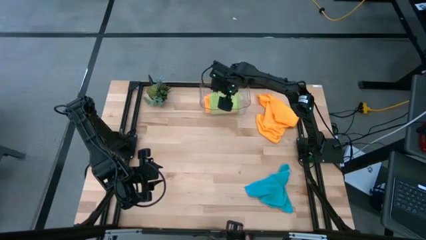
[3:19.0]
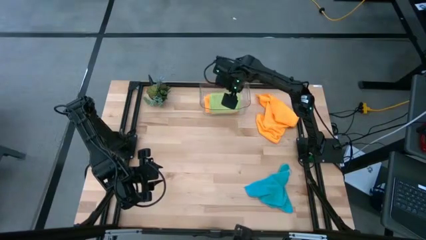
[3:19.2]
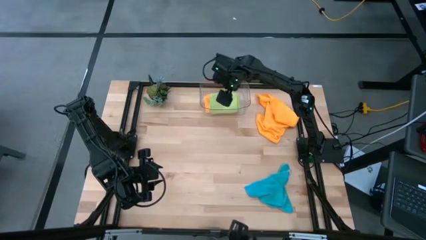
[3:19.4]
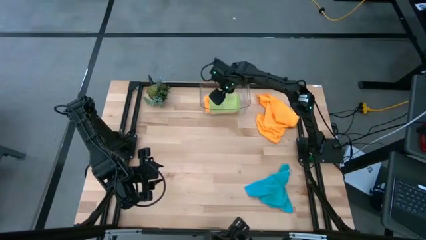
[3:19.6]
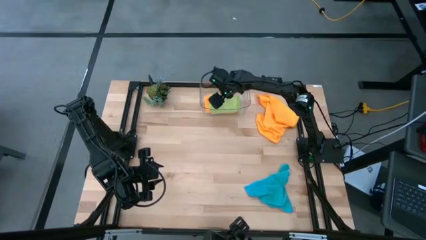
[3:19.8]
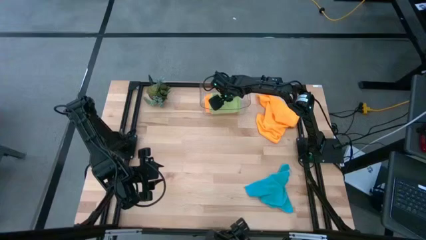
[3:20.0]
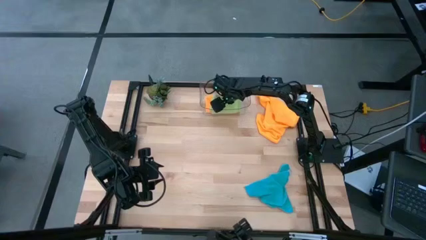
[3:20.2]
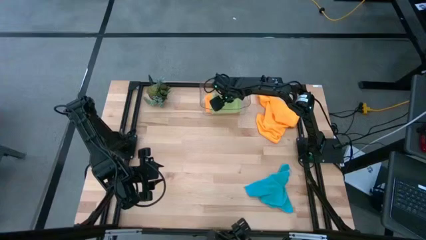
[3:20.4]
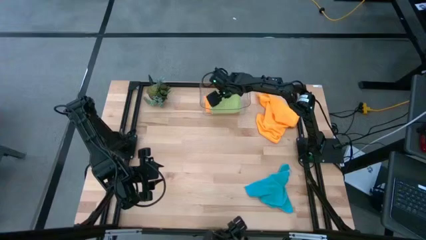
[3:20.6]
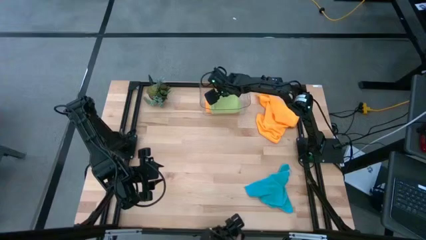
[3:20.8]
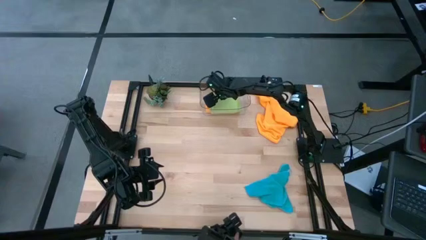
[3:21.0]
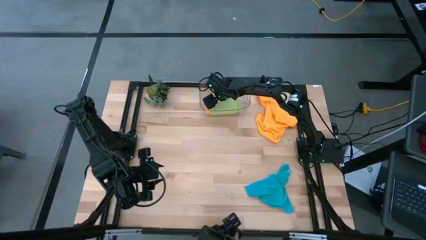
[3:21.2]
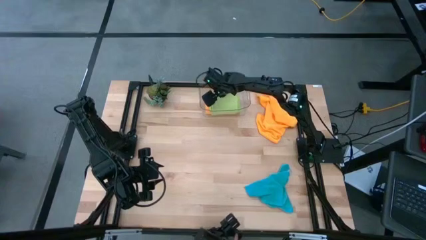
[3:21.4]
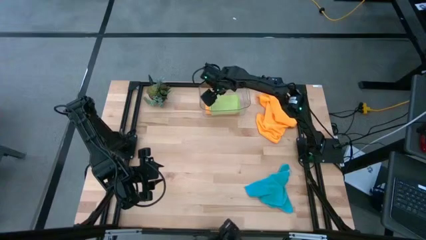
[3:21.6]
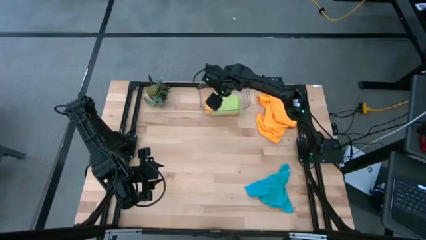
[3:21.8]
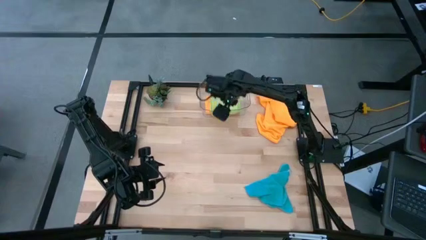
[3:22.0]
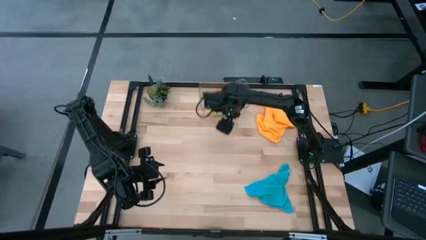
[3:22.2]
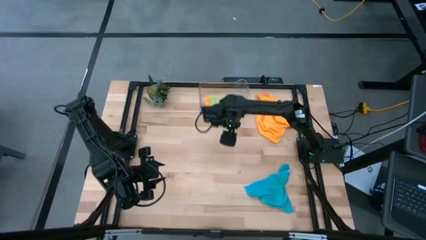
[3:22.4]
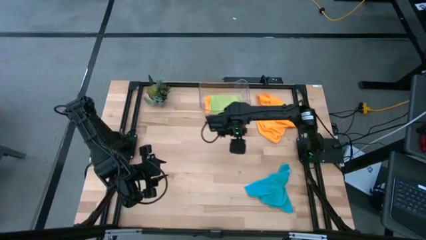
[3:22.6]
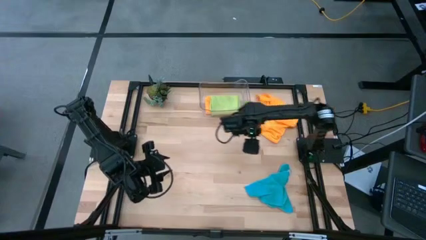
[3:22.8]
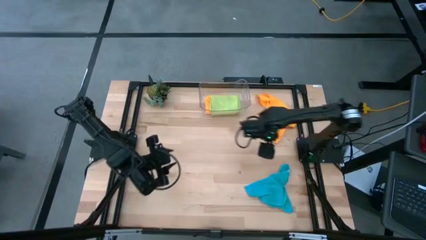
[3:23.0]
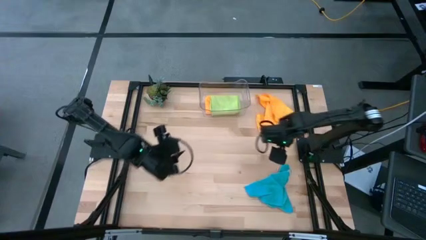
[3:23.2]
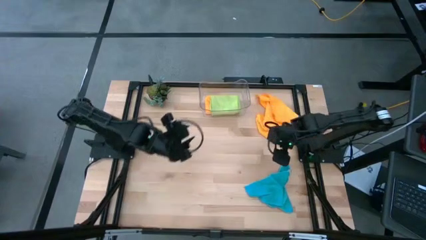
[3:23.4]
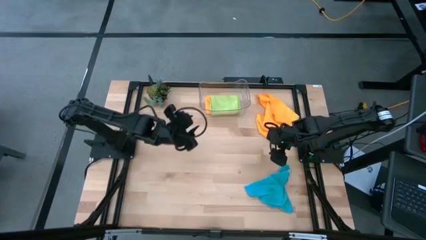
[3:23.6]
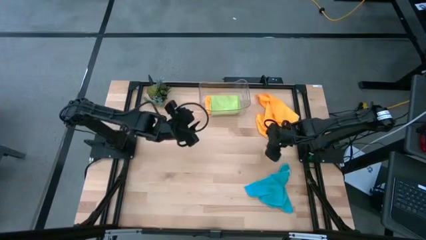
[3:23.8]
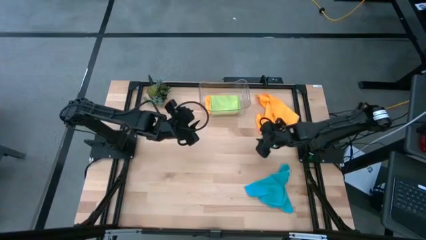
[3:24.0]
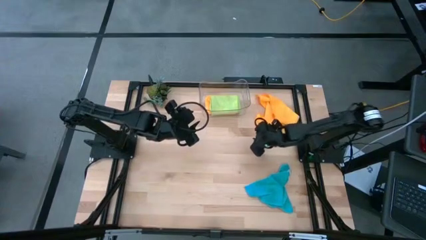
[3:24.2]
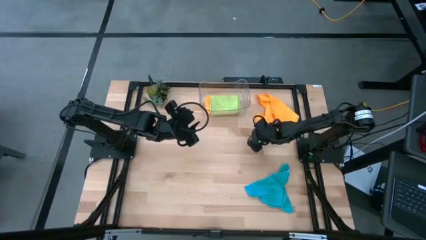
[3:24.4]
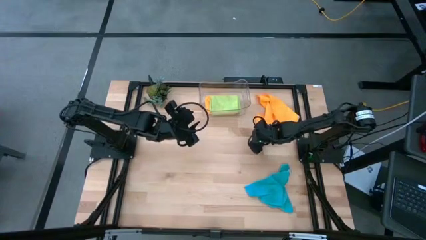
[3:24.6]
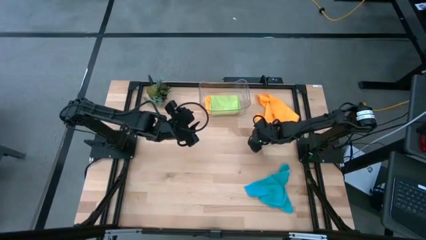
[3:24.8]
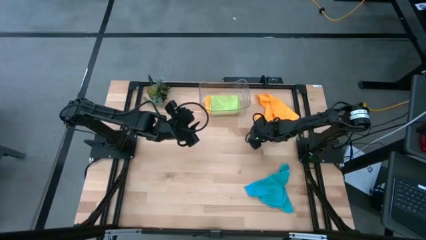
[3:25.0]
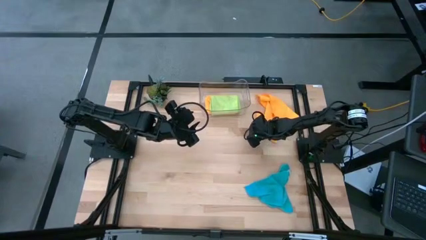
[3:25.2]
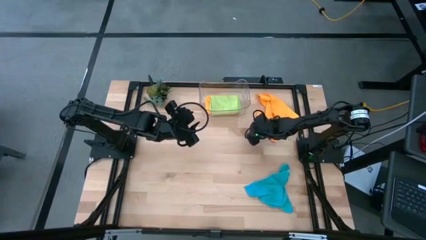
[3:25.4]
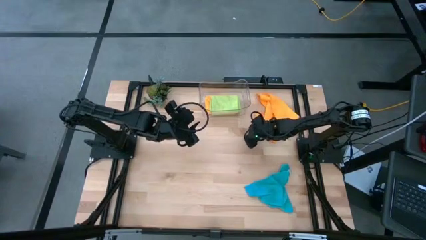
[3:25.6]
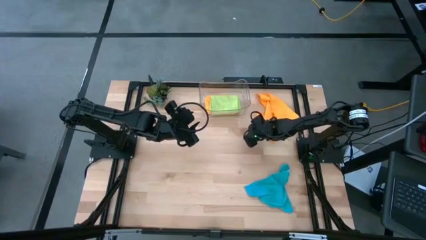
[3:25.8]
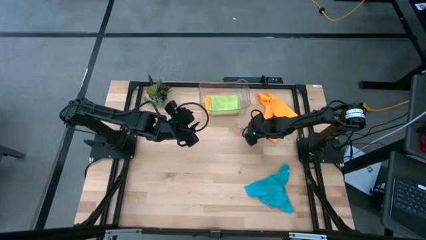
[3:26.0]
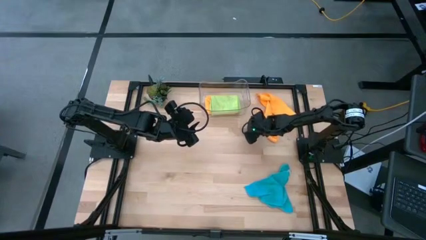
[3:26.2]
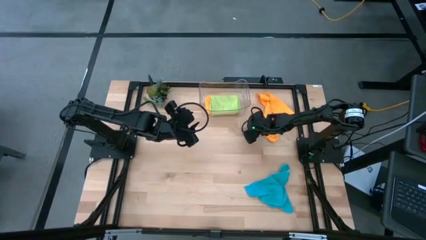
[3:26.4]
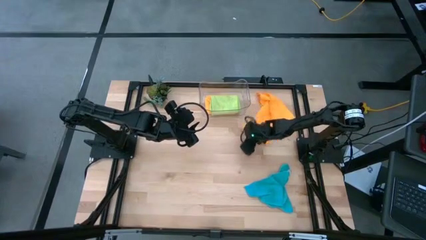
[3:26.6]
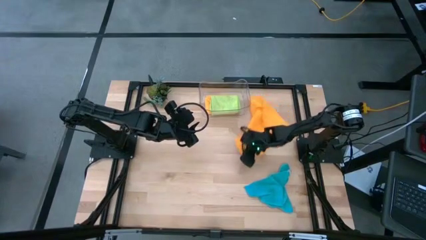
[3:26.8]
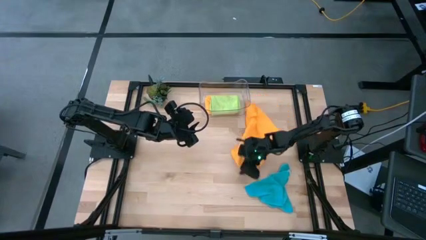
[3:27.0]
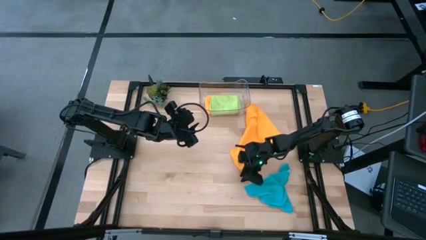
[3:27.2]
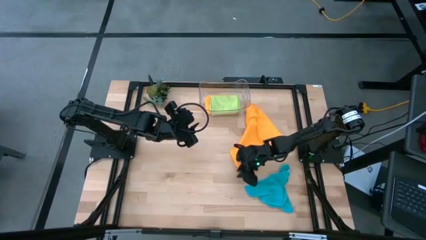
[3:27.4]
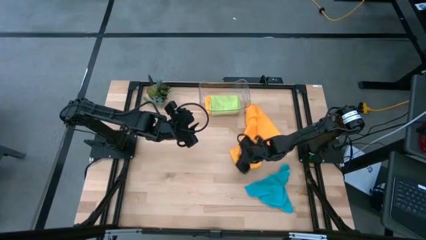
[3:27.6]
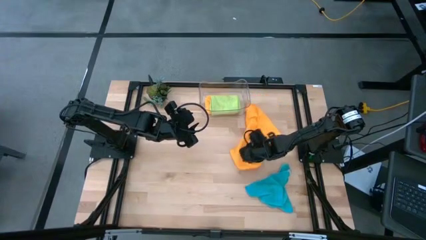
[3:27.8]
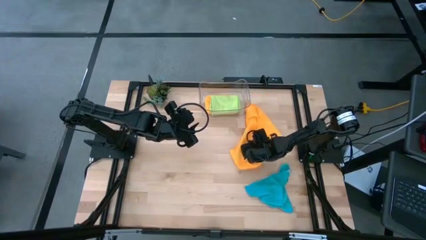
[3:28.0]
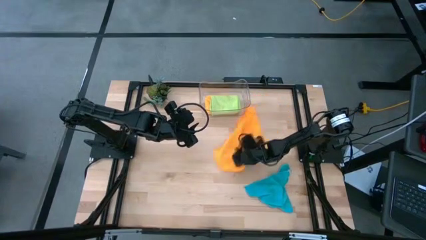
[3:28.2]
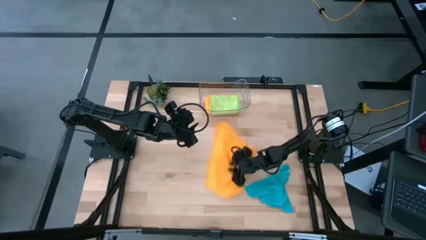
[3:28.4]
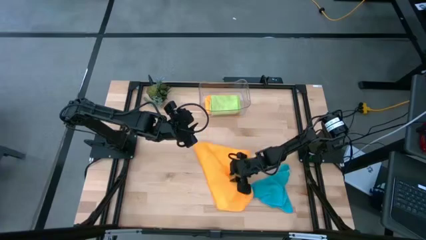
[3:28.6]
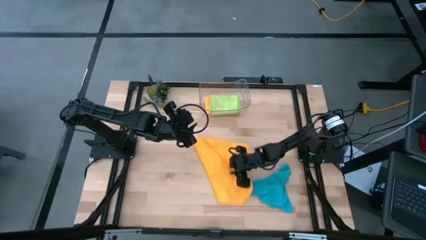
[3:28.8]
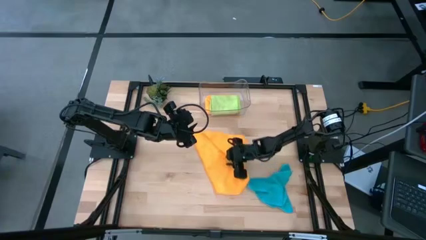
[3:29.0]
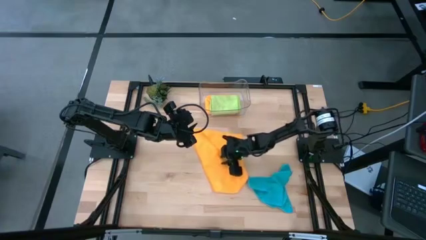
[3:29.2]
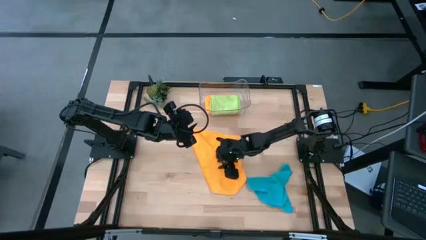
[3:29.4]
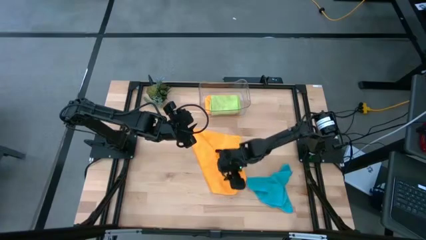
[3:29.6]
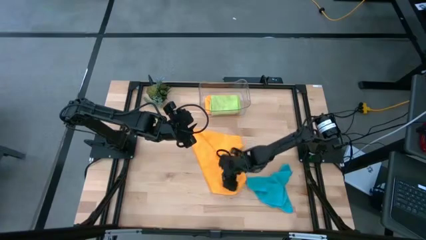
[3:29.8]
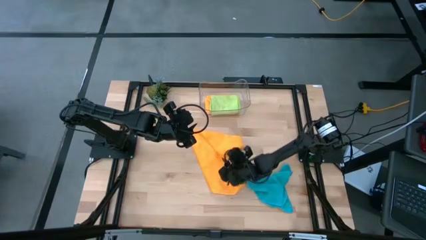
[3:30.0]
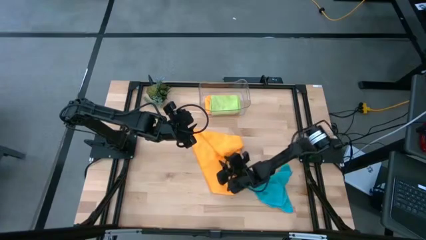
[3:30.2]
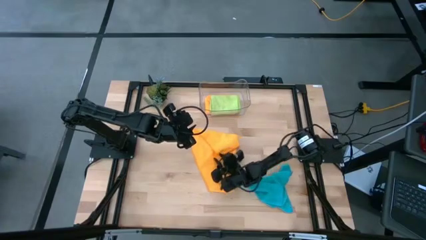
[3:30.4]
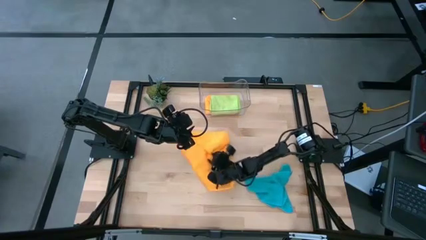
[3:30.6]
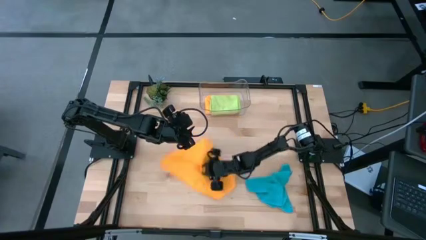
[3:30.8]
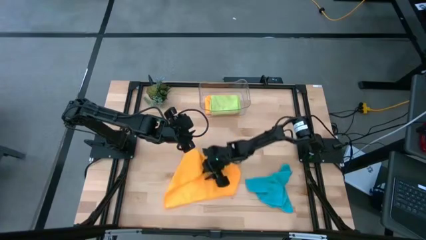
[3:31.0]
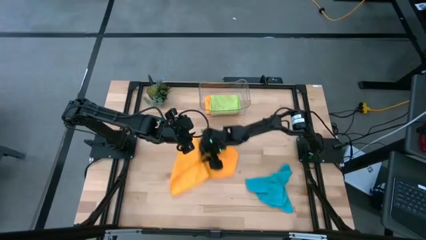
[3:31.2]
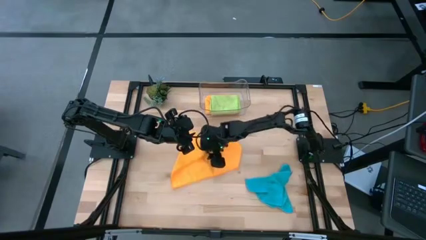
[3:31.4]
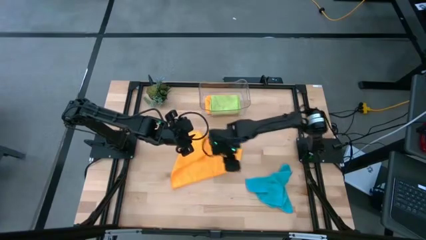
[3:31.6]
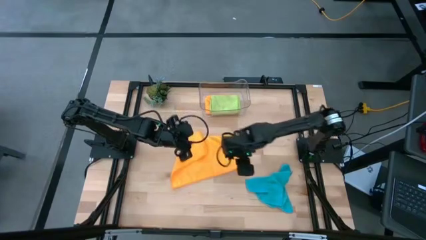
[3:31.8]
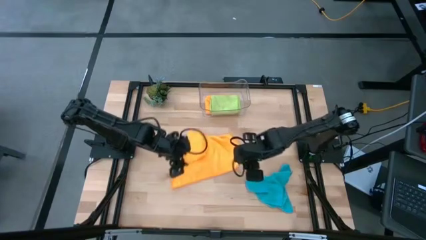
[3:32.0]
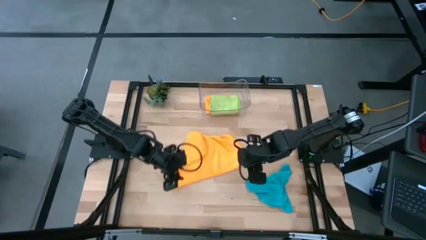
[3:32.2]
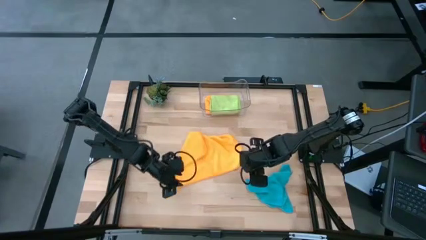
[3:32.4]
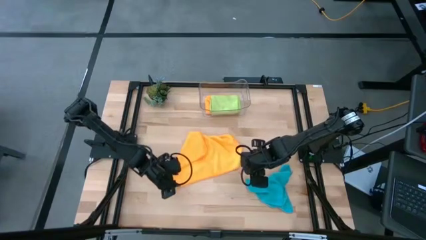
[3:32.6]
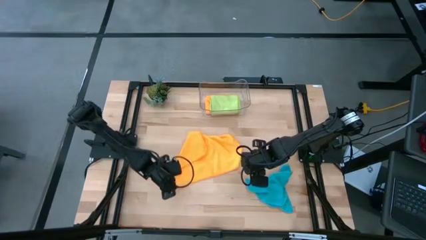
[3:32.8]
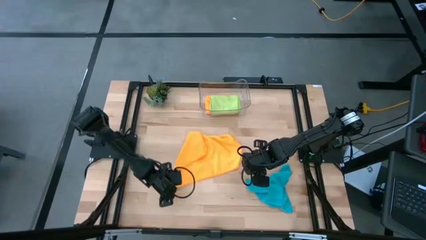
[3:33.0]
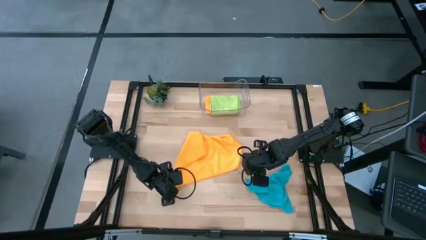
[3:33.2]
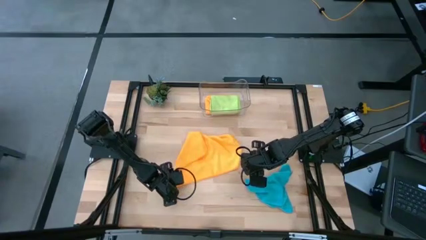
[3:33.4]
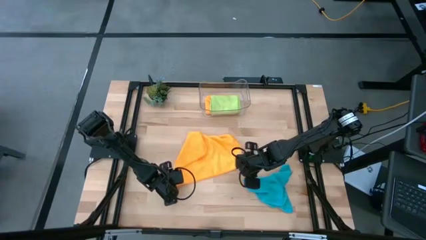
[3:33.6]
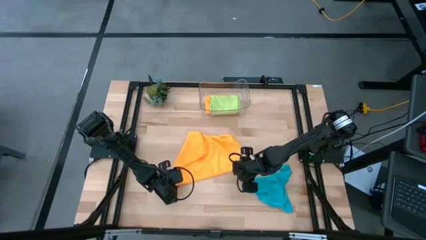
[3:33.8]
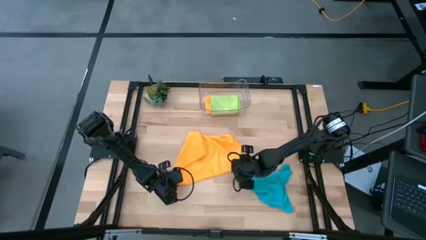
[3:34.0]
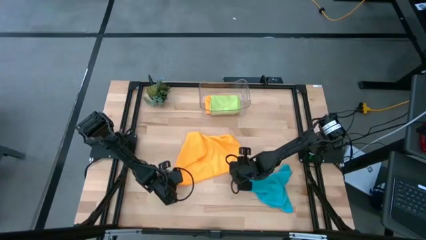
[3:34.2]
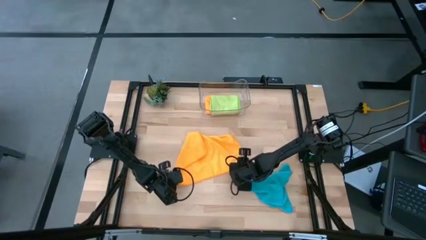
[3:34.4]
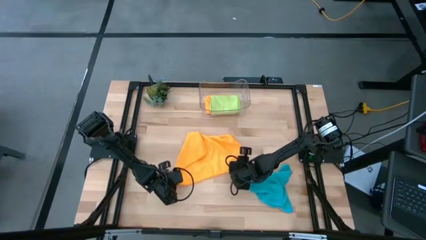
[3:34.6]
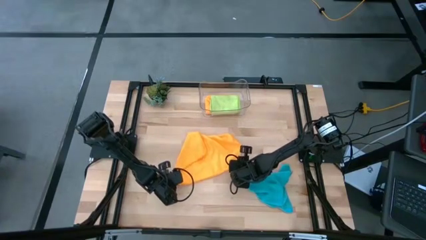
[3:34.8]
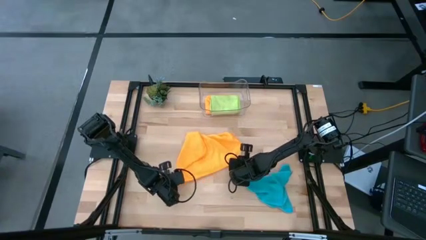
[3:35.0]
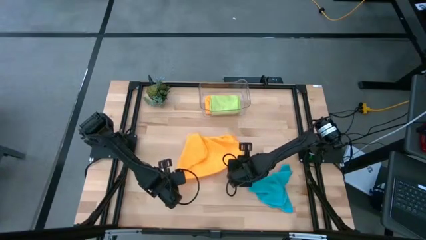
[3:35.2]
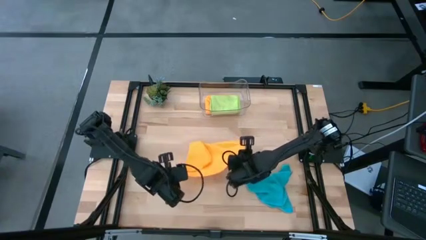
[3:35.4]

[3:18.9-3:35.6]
Task: Fold microfiber towels
Fold the orange microfiber cloth

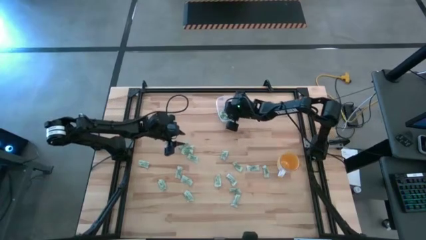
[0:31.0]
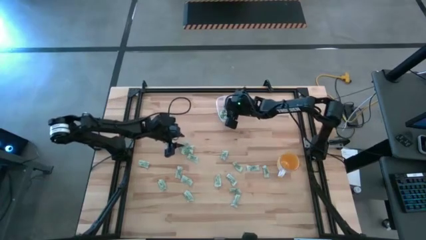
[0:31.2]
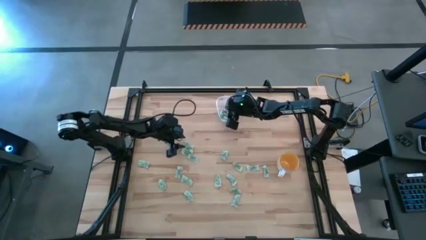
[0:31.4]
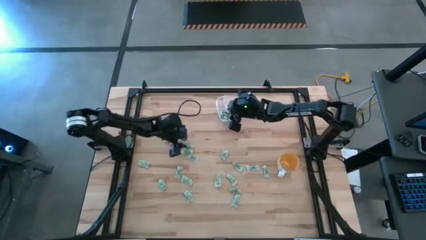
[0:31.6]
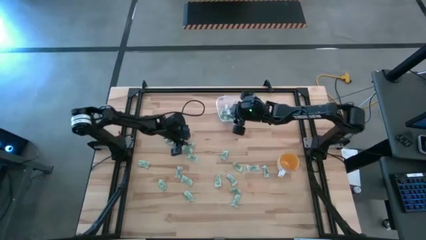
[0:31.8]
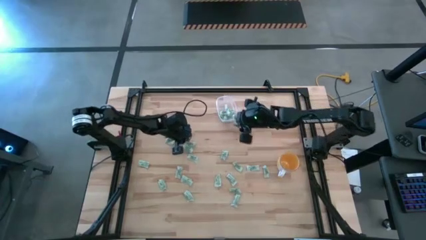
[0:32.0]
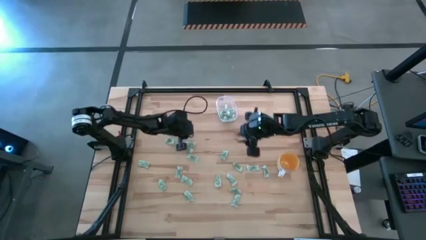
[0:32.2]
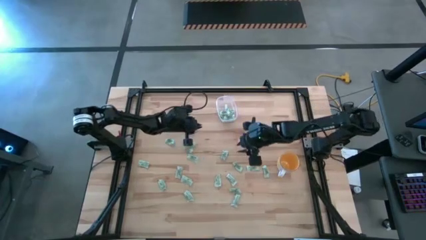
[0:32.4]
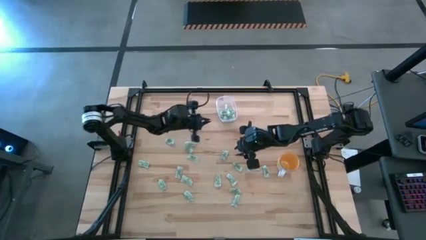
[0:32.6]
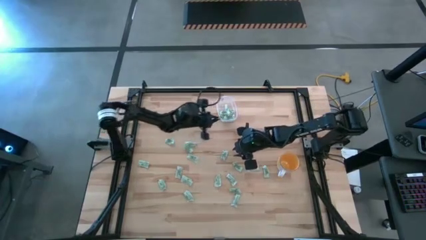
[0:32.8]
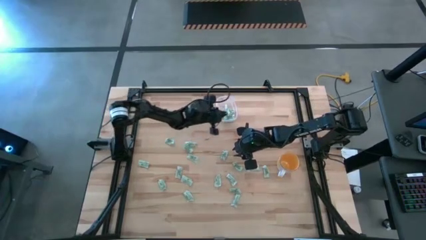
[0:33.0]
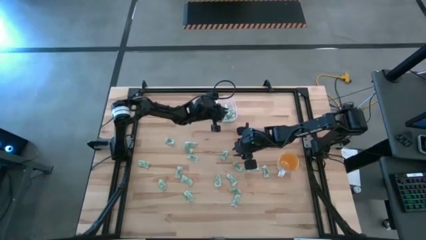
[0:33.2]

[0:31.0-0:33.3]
Task: Pick and place Stevia / Truvia into bins
Put the green stevia packet into the transparent bin
